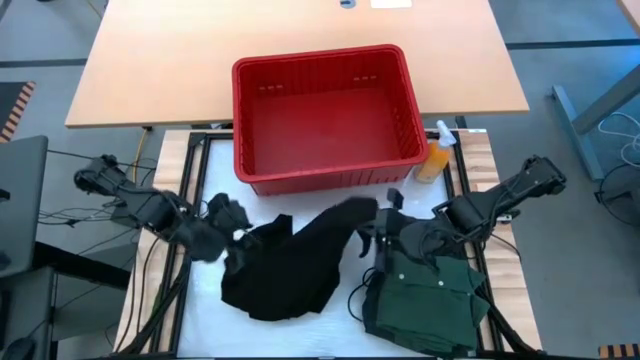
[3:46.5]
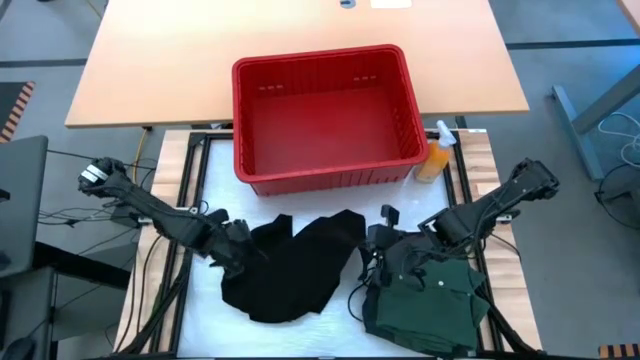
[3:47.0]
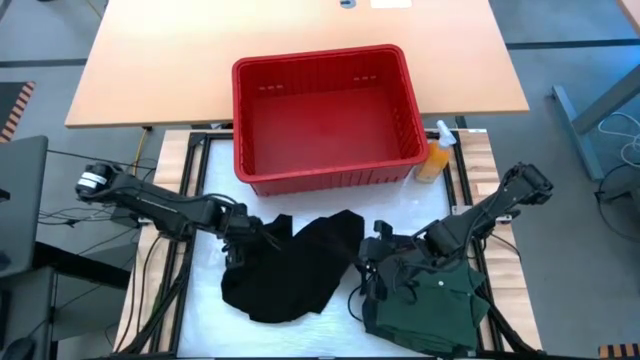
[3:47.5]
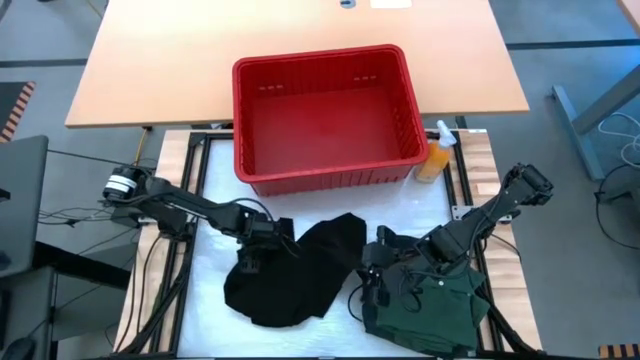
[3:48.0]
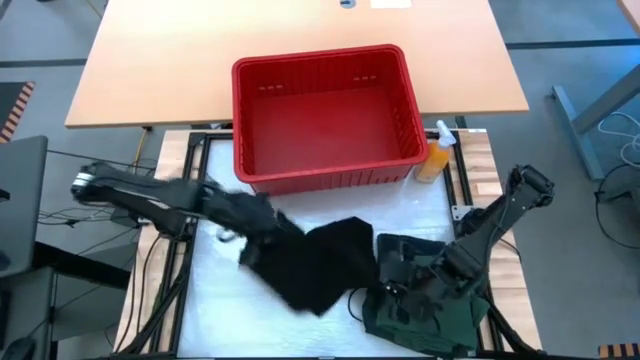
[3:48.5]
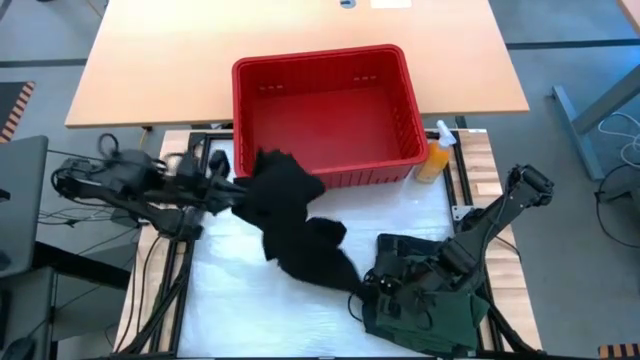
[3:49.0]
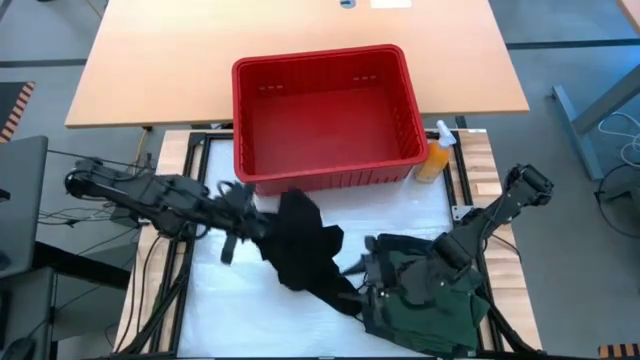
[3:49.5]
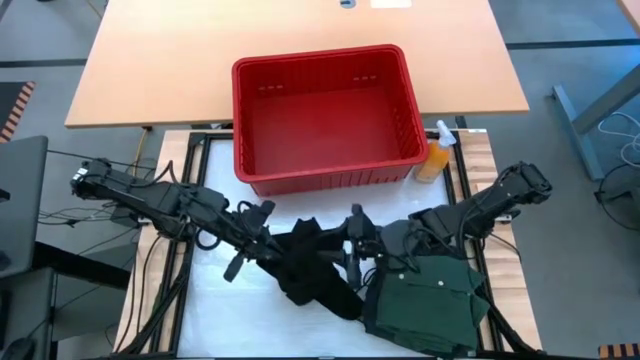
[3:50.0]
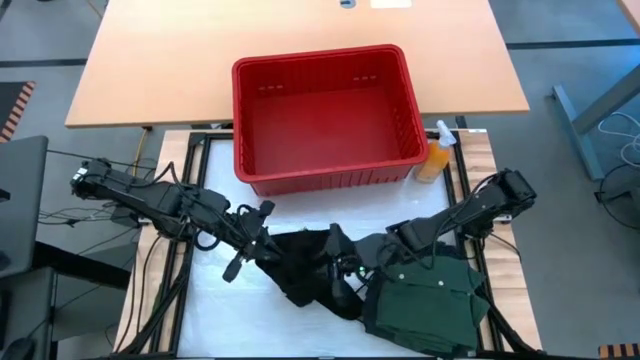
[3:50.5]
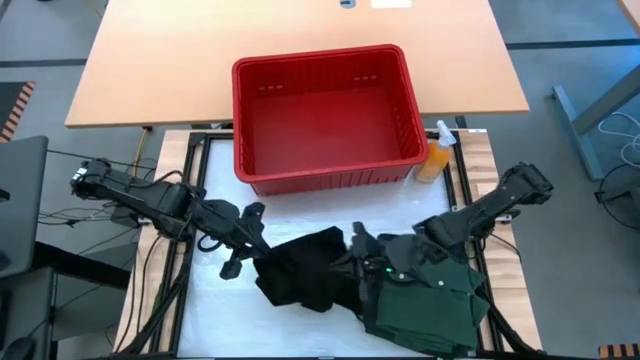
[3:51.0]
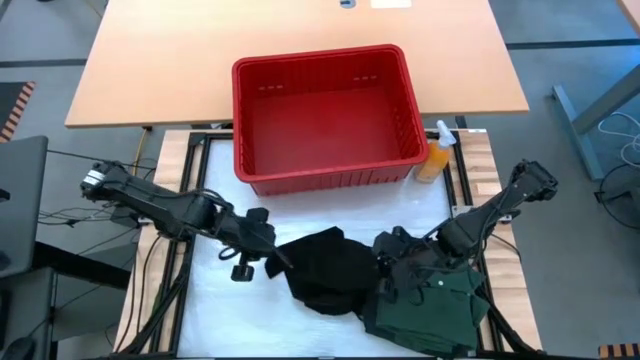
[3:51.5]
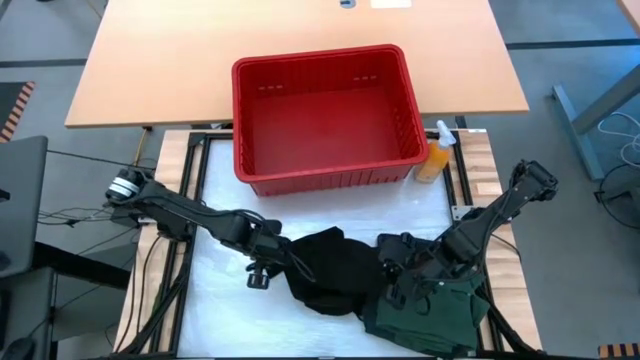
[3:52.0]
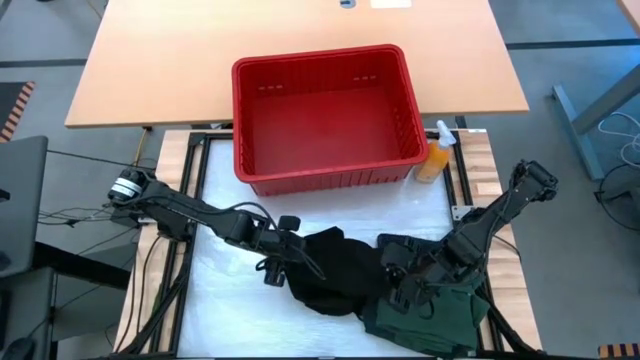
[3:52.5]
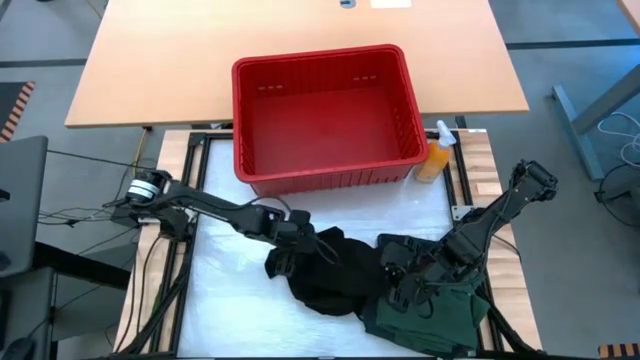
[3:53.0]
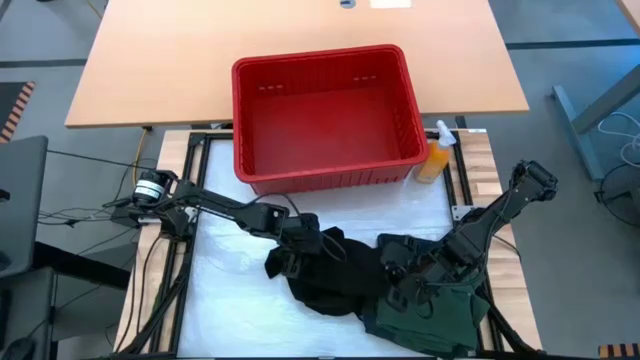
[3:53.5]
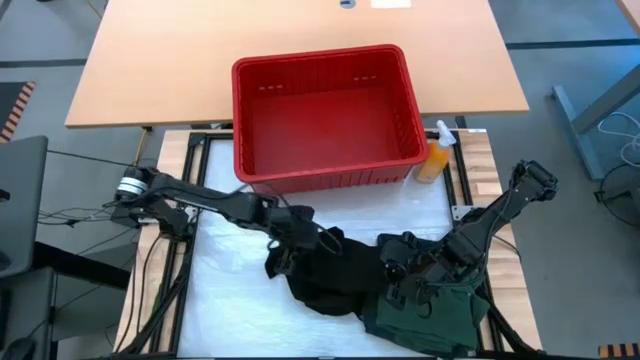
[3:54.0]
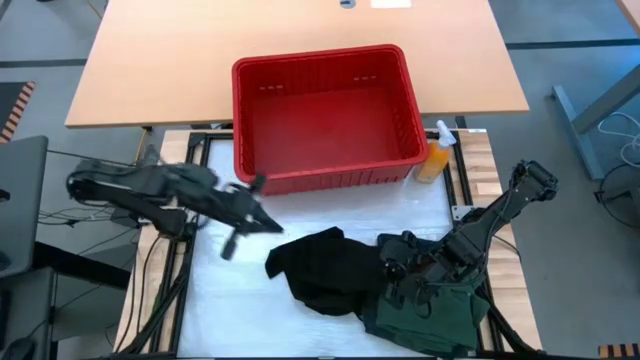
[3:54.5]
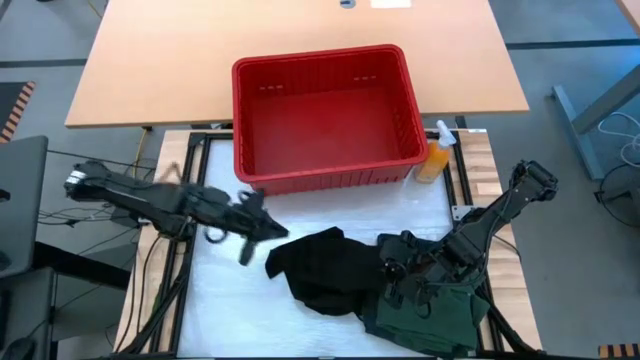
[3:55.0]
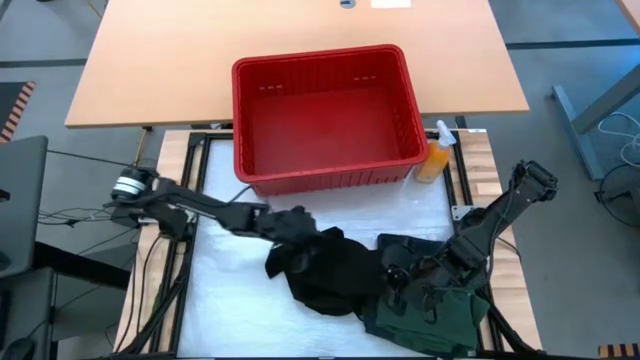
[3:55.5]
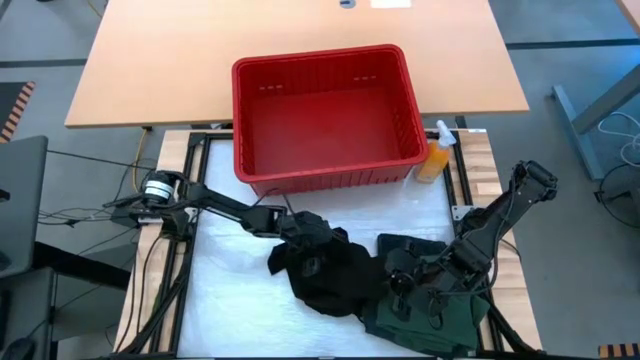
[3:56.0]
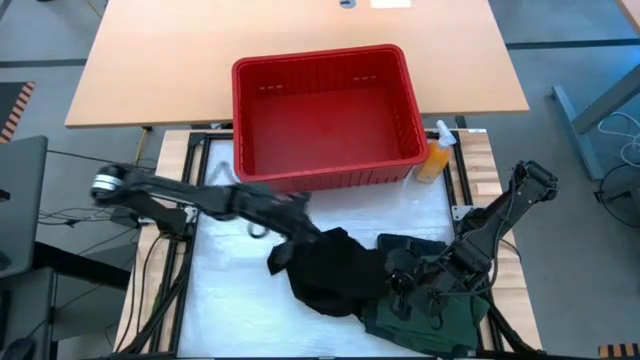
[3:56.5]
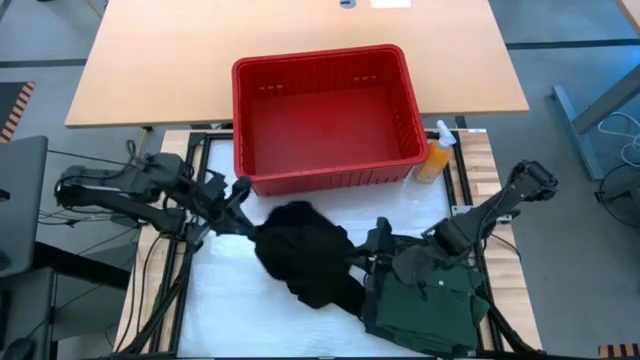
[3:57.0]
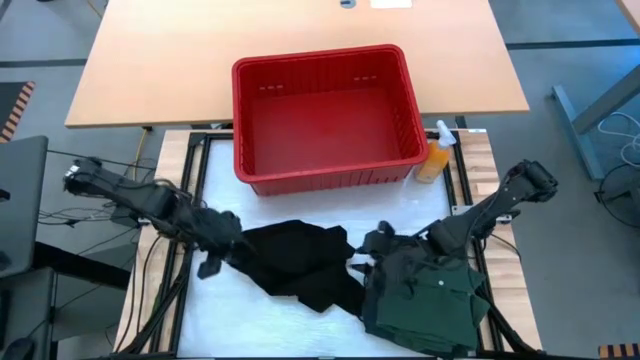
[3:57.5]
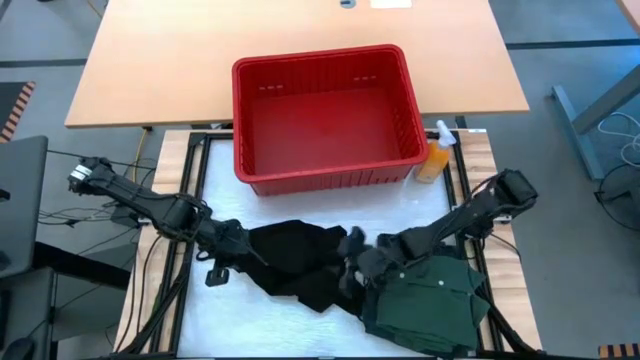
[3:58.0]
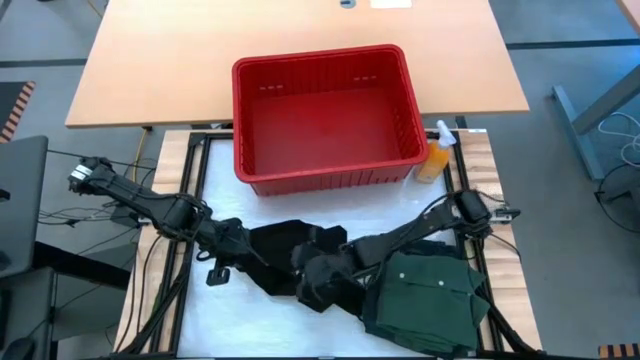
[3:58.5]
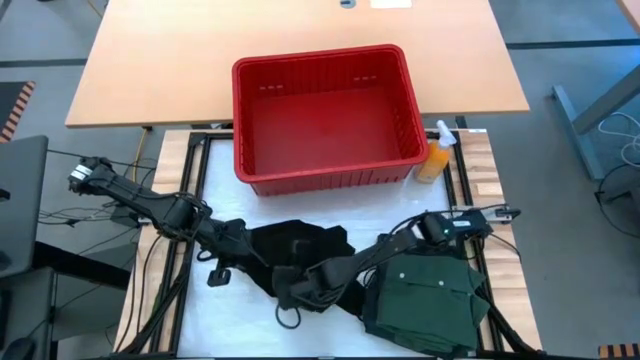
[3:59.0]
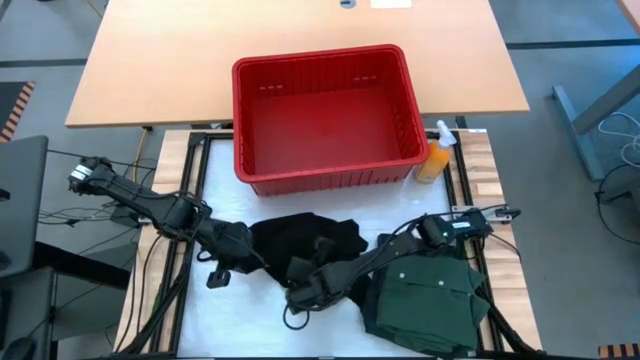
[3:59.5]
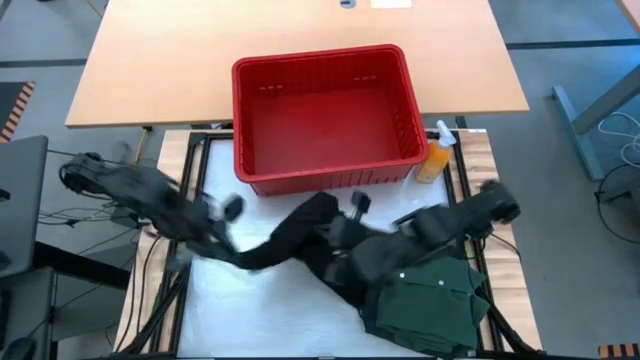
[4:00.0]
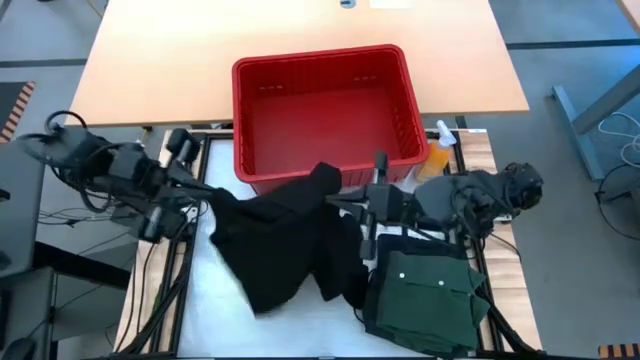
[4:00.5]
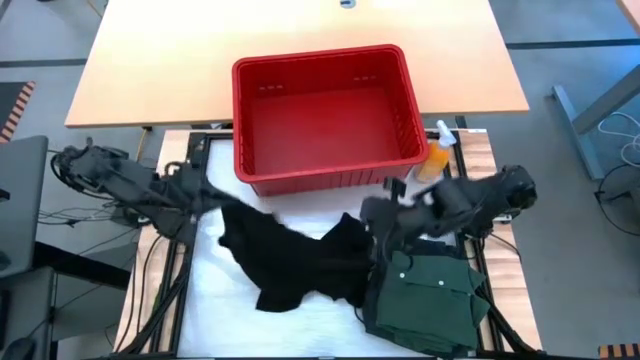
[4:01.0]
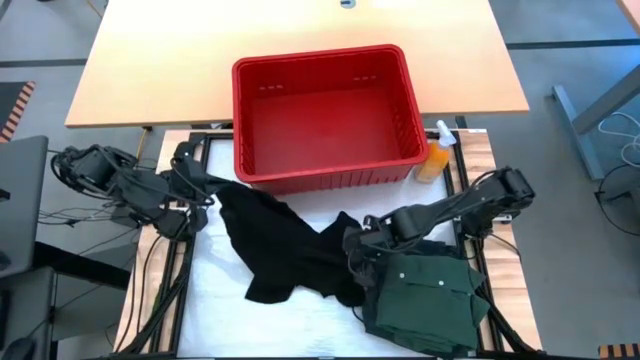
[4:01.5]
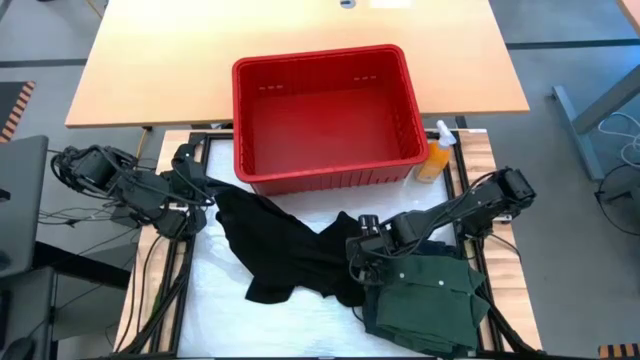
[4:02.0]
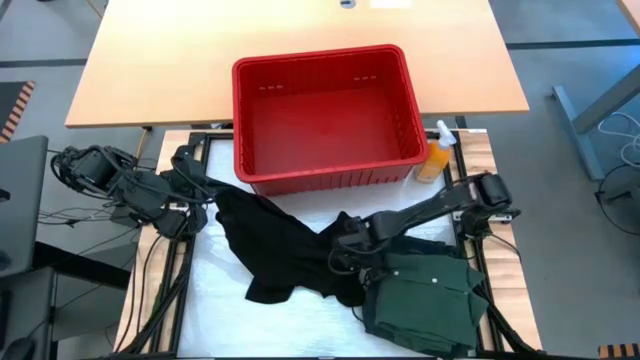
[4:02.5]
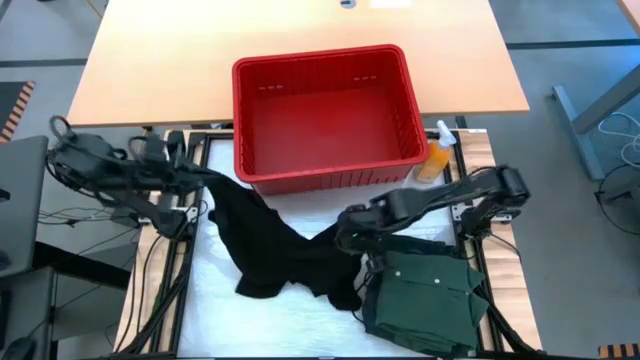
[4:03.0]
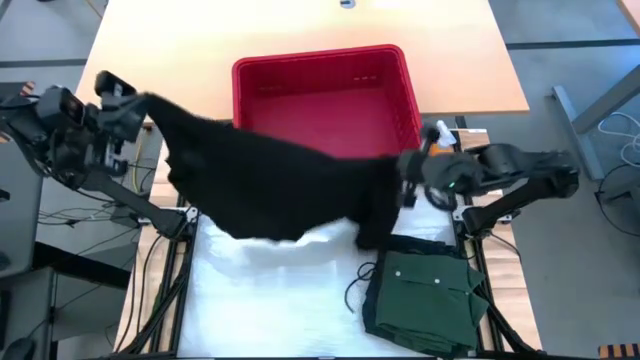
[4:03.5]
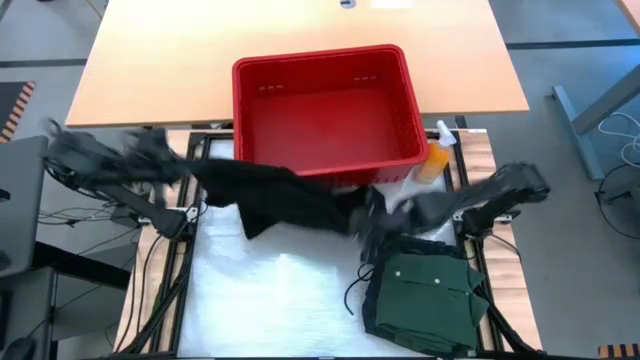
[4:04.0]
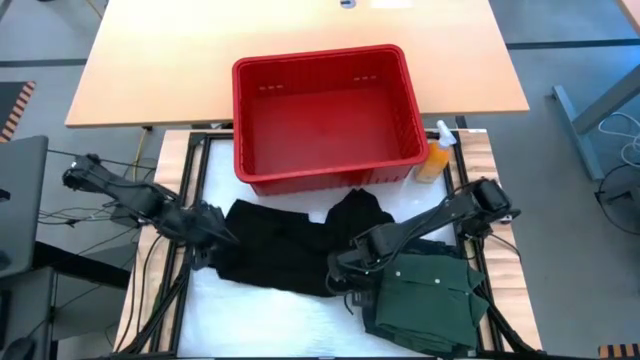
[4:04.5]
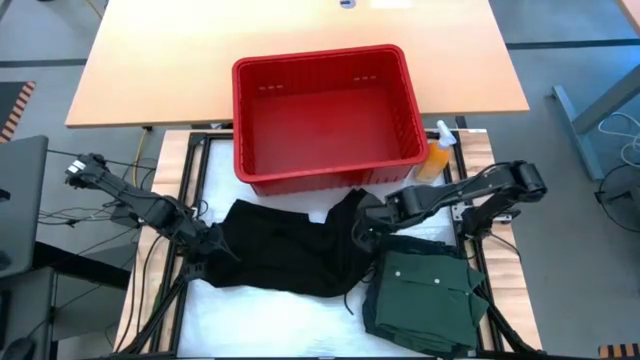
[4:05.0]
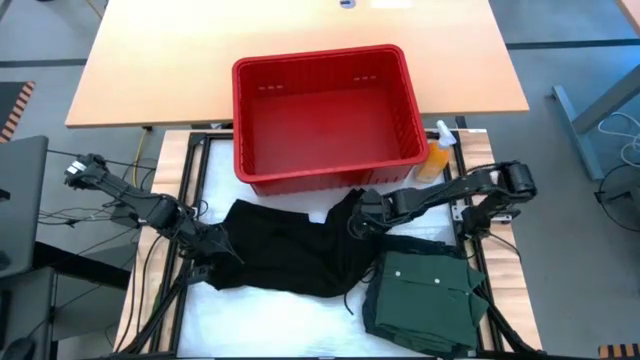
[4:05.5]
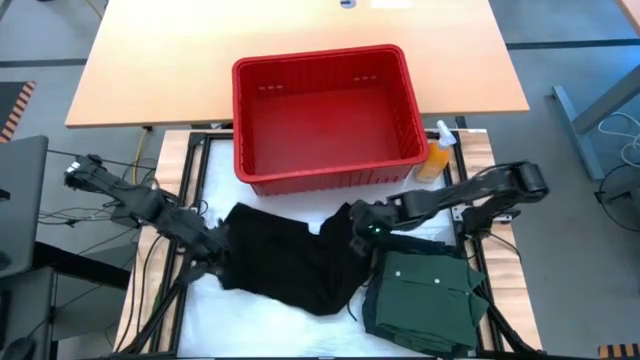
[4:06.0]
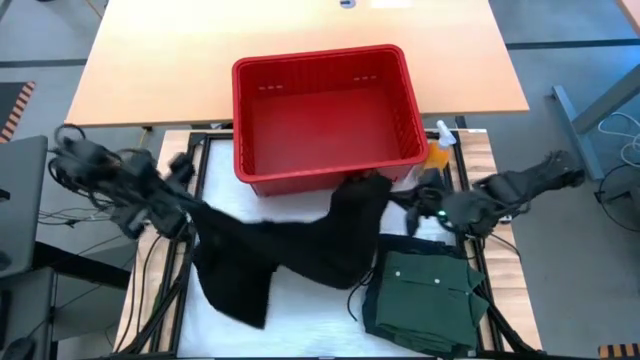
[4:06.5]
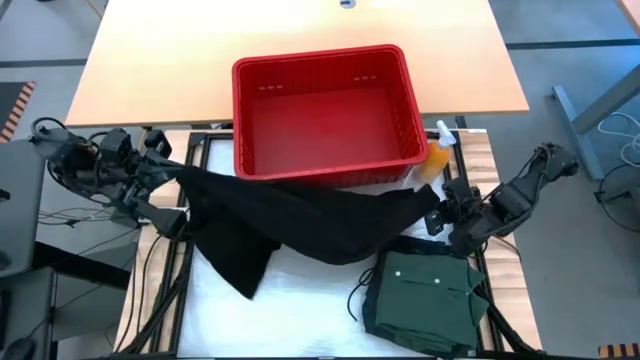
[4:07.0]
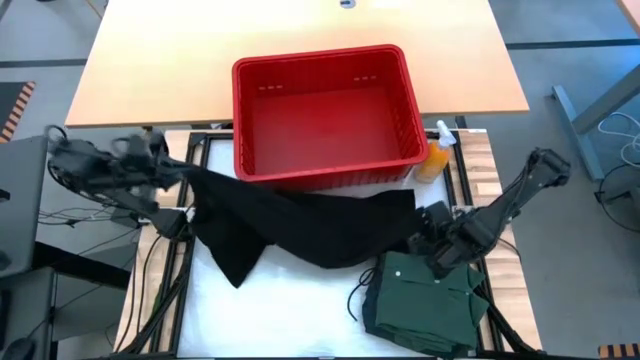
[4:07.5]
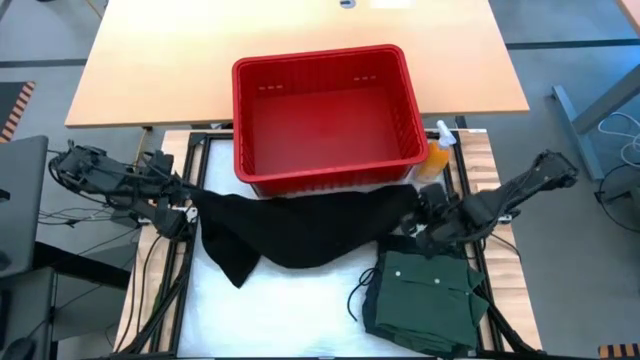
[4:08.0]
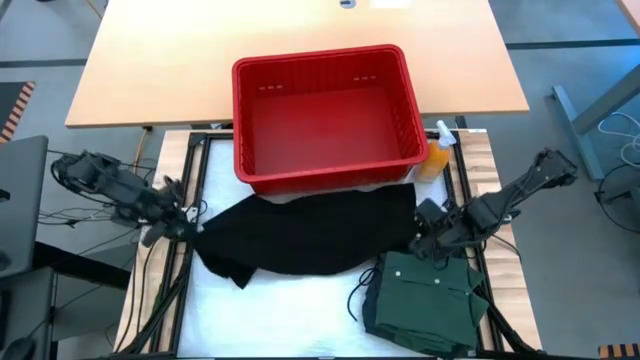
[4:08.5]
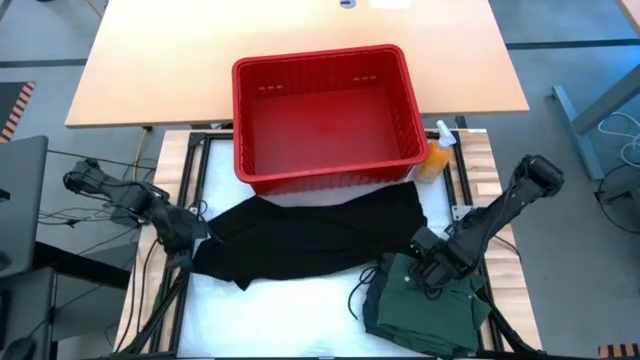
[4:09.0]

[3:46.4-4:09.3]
Task: Fold laundry
Fold the black shirt
